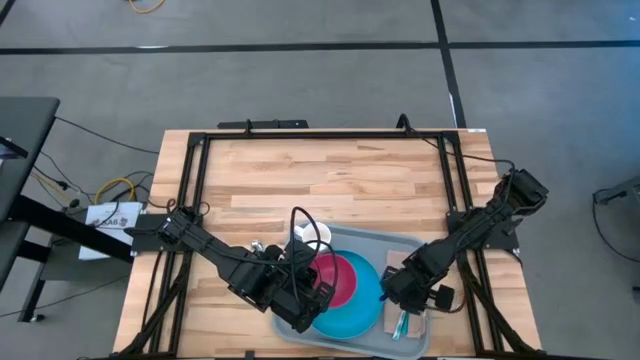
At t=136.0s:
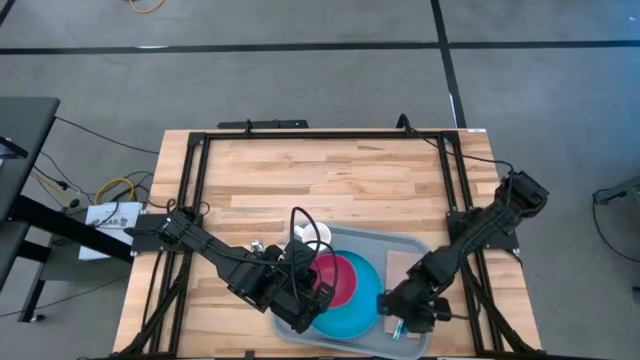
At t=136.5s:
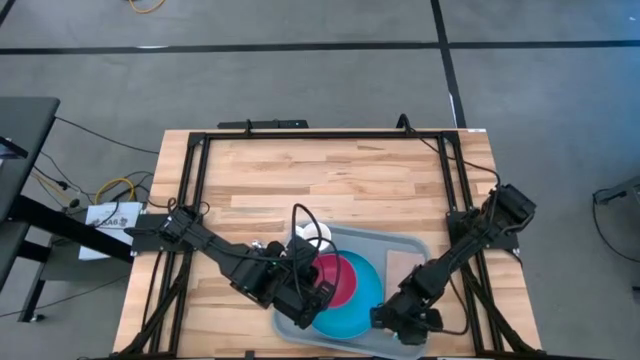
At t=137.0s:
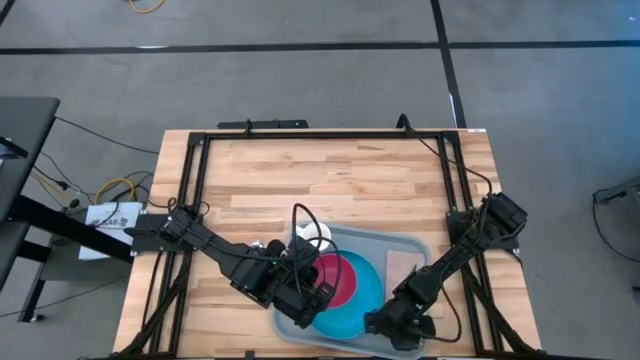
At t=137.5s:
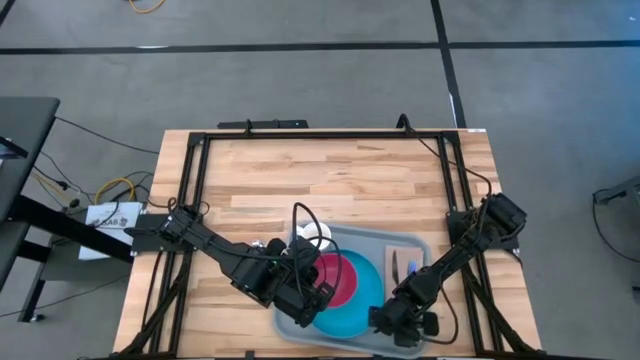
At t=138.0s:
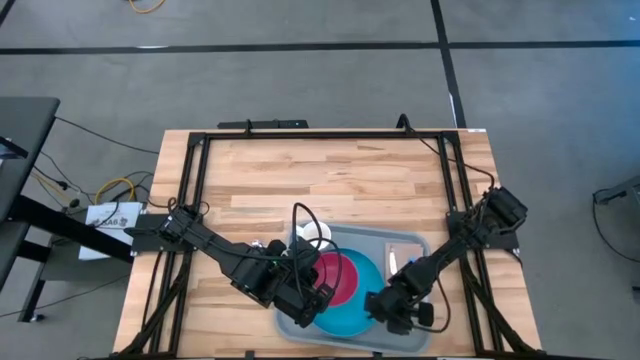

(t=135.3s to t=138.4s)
Task: Set up tray
Adjust the blue knife

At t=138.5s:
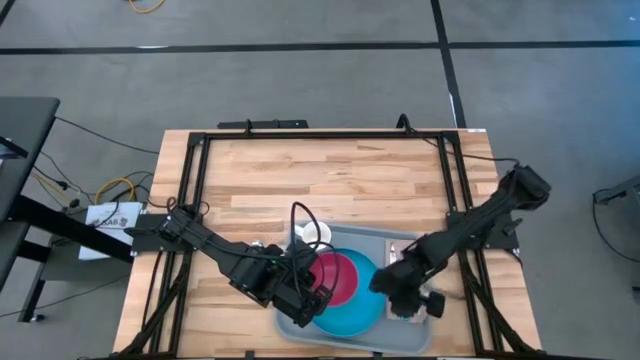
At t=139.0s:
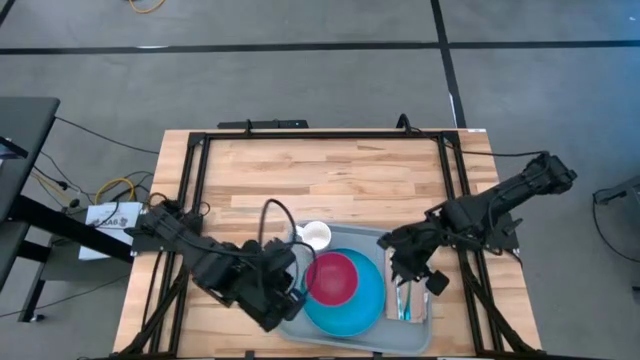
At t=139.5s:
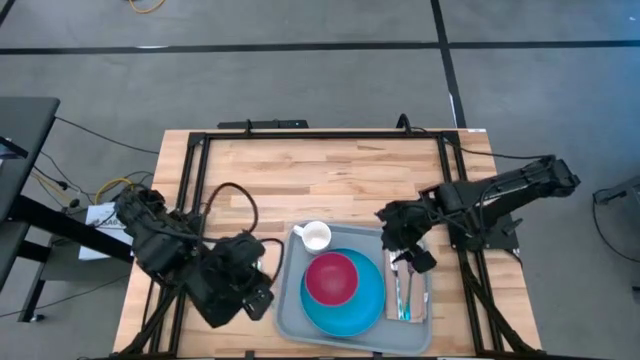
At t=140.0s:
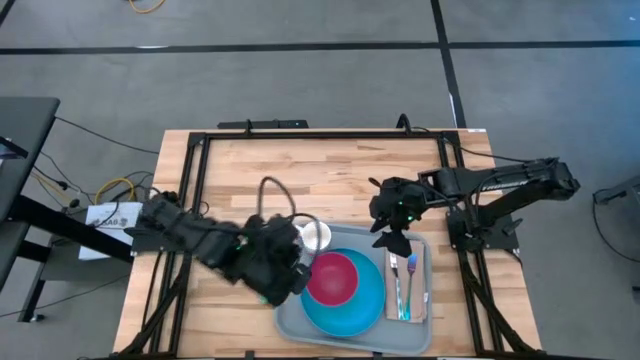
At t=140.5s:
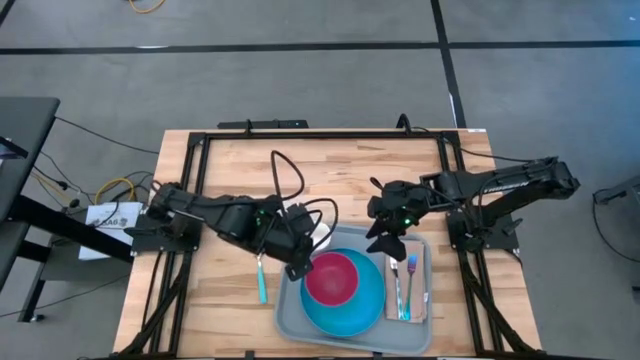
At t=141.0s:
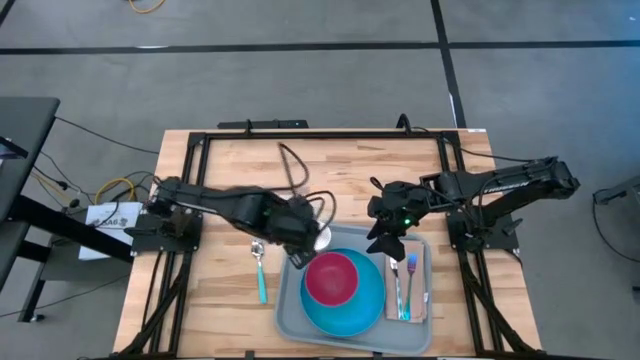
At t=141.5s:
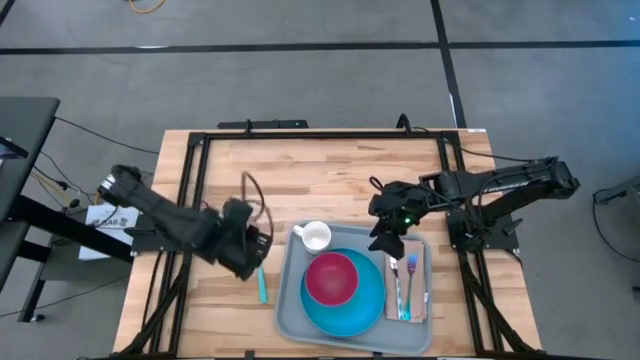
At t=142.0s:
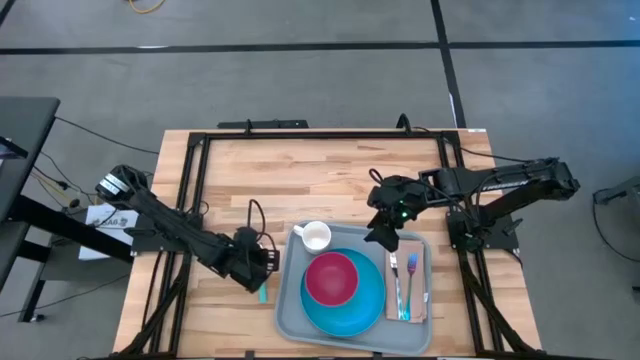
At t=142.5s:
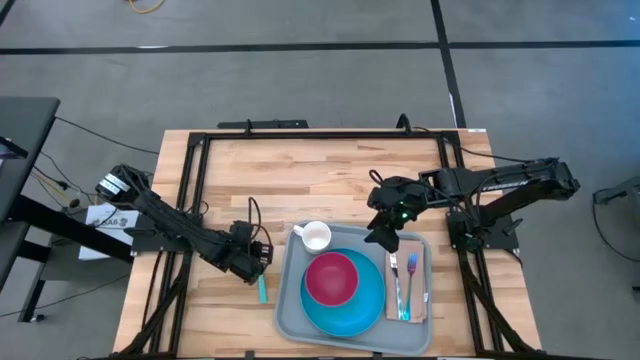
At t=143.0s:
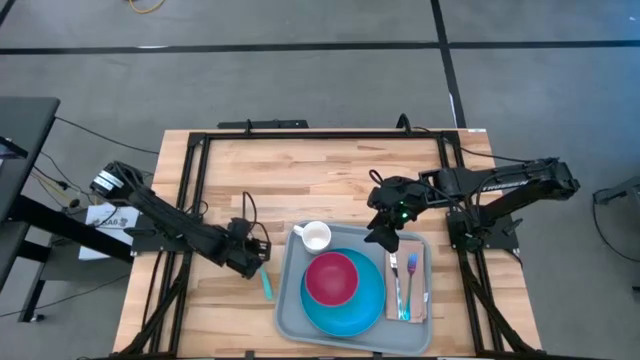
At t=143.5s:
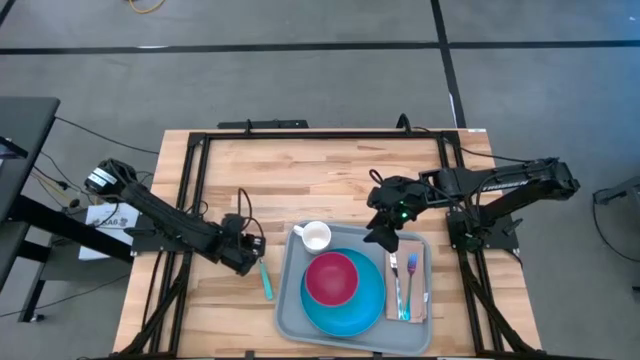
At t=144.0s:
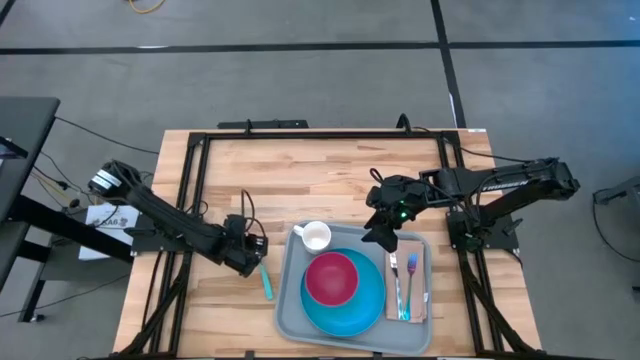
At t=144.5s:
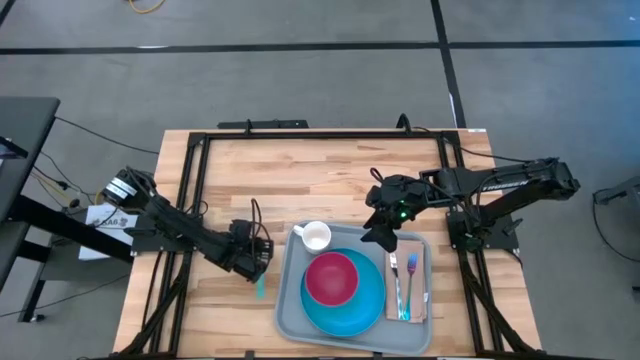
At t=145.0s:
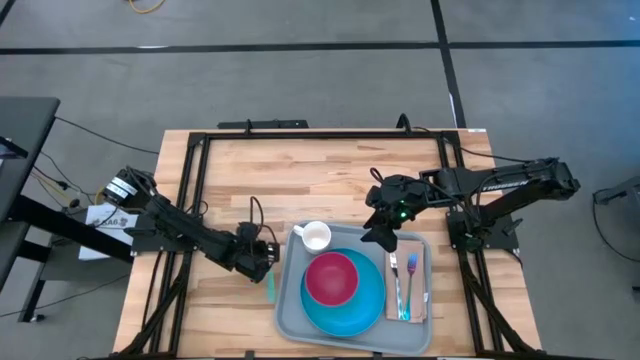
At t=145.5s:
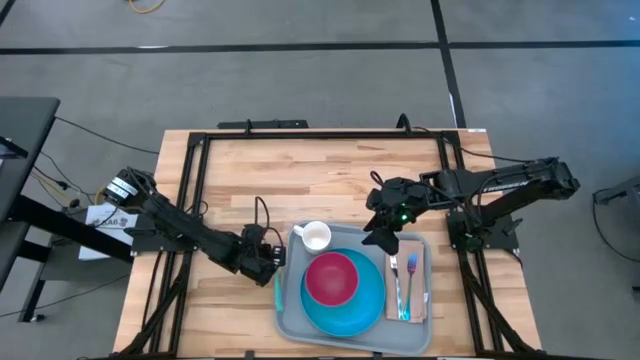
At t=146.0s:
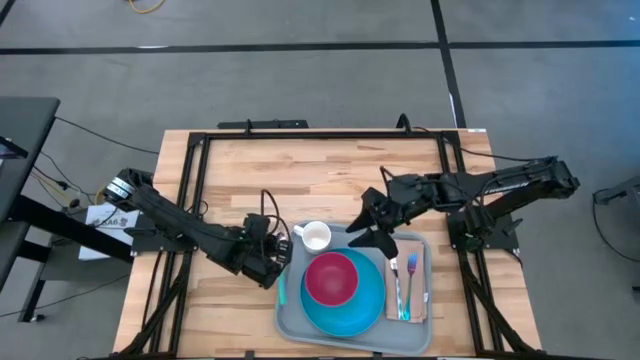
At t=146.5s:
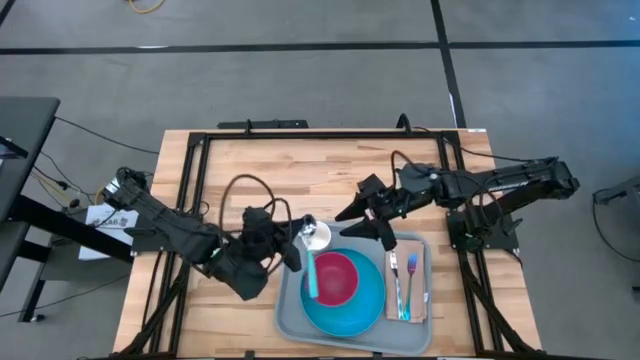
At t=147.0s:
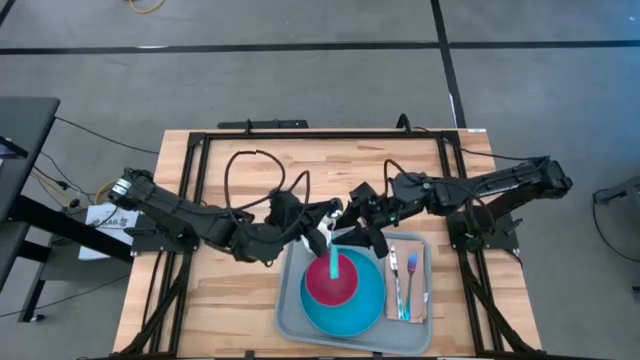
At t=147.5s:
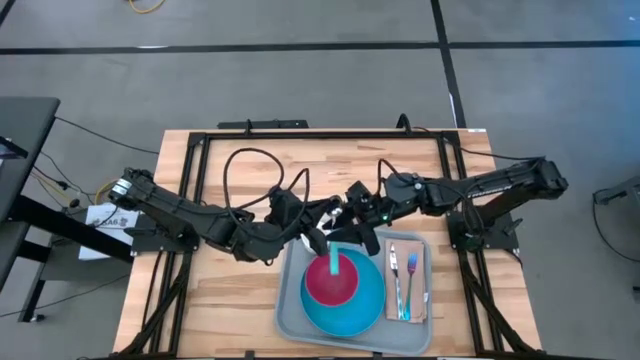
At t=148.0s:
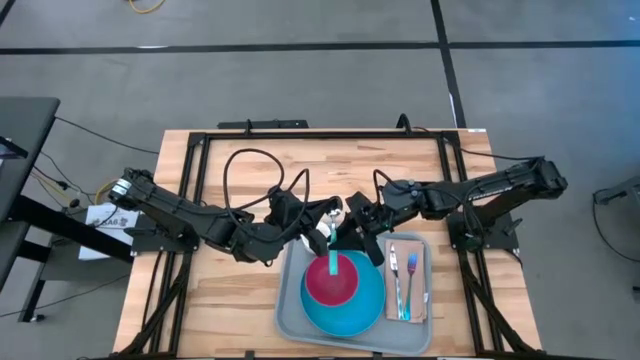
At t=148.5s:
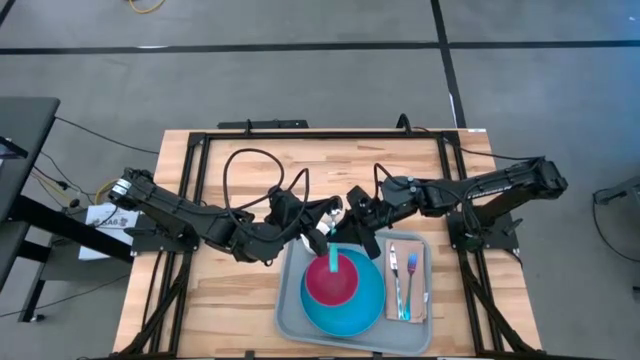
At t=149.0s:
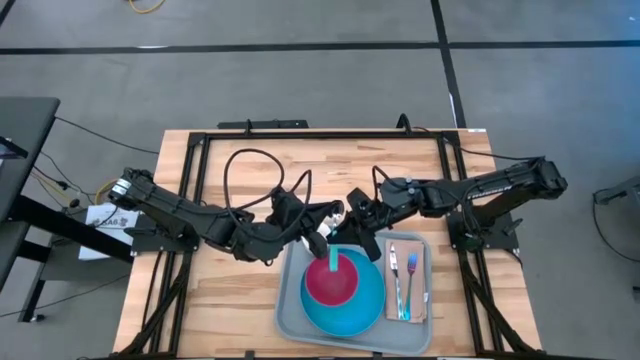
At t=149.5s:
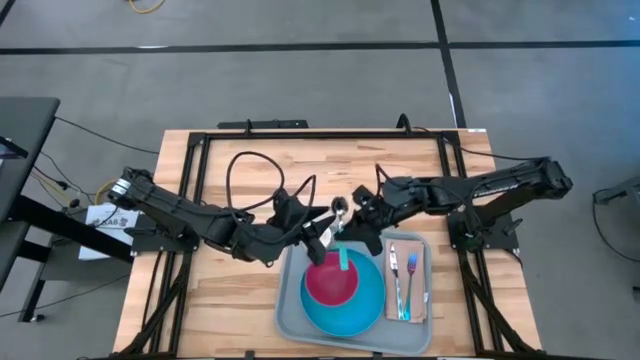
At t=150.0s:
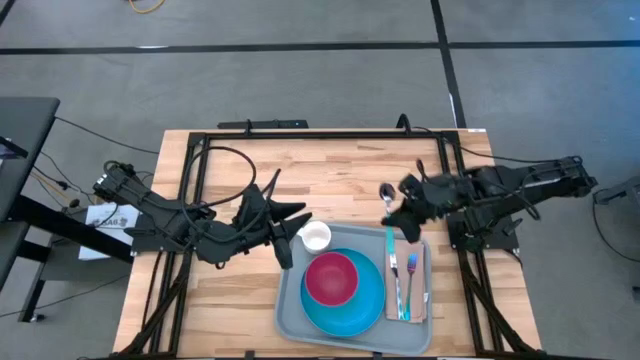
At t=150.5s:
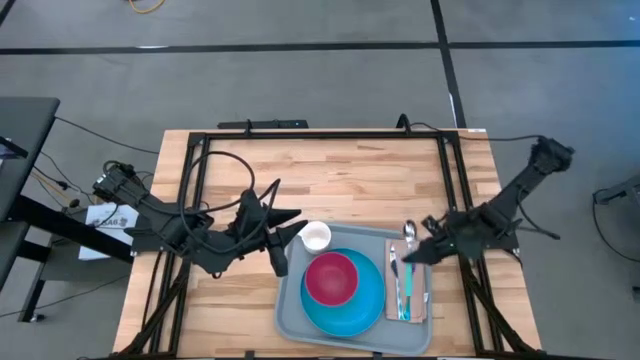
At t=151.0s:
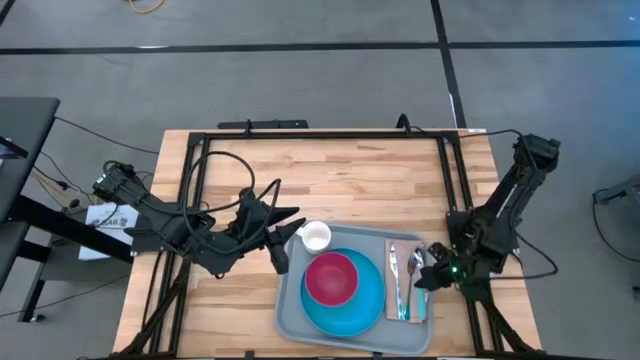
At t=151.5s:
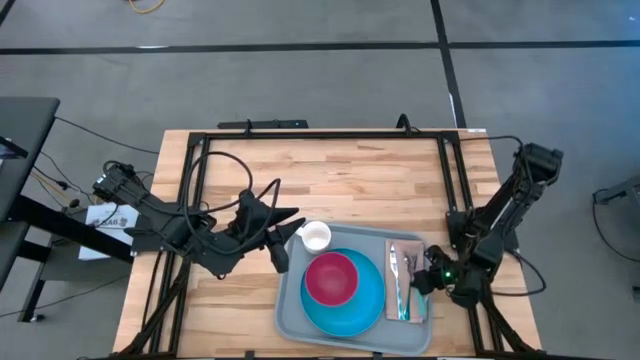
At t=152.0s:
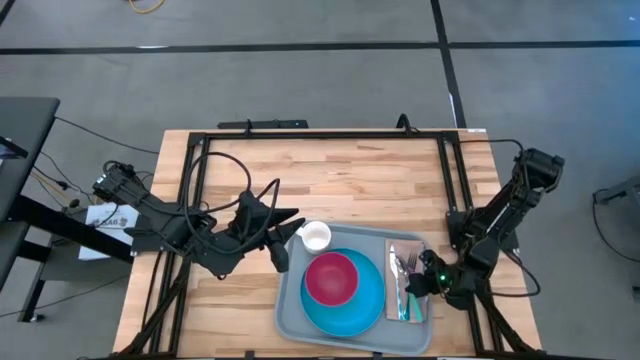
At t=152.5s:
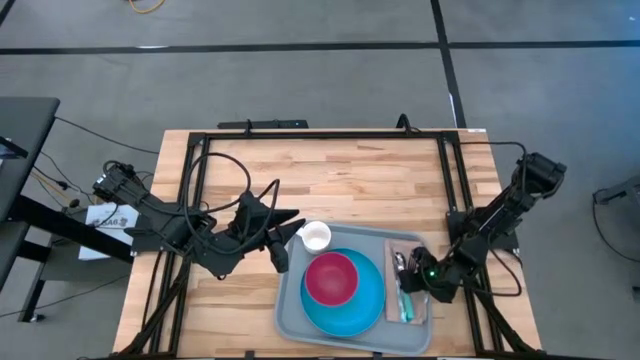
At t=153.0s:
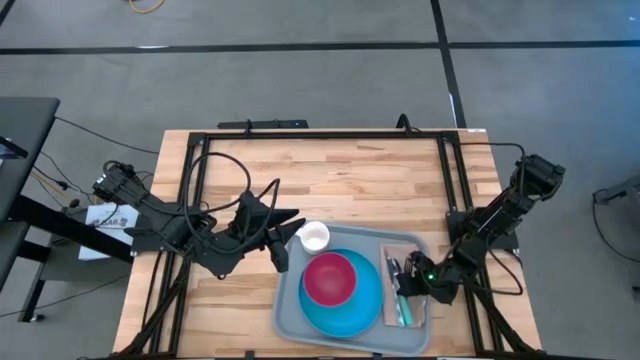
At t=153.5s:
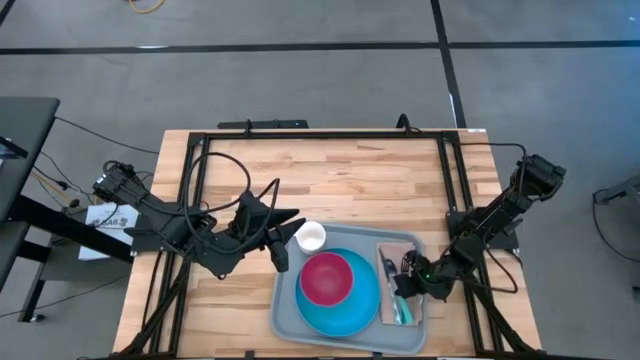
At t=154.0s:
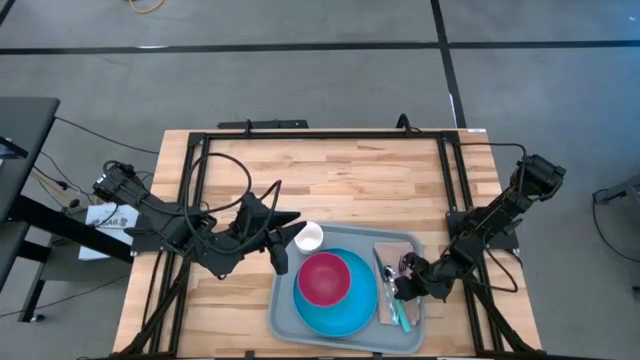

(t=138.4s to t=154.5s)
Put the green spoon on the brown napkin

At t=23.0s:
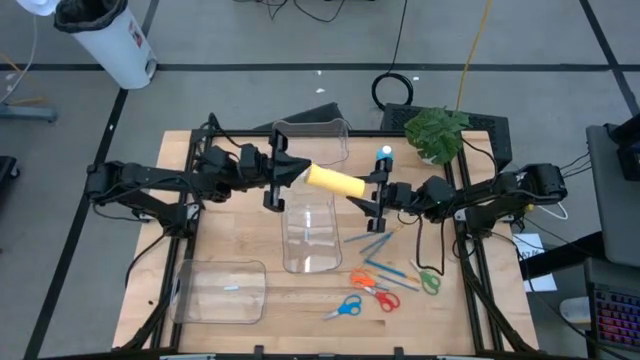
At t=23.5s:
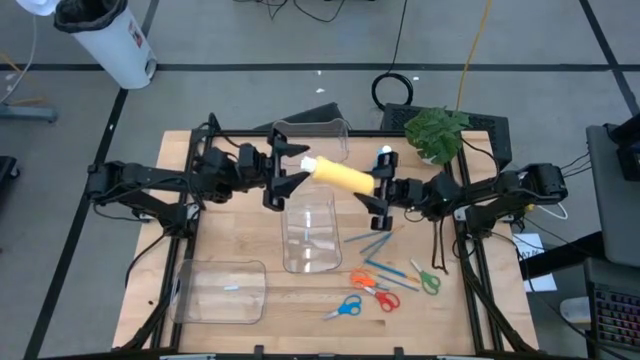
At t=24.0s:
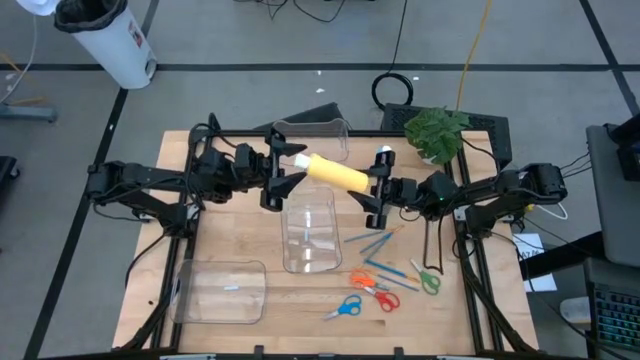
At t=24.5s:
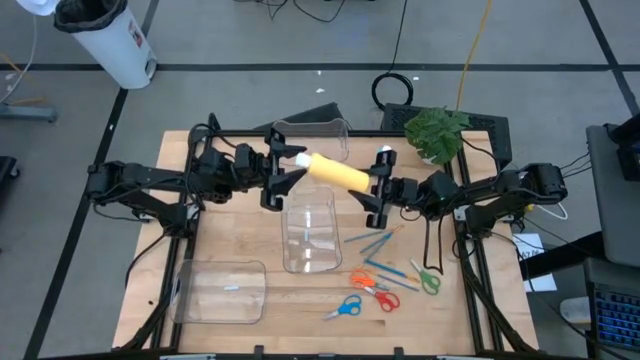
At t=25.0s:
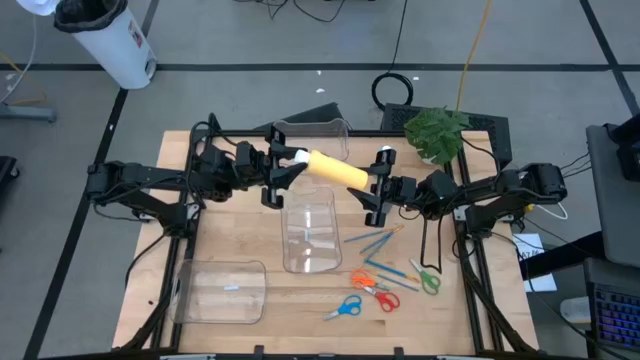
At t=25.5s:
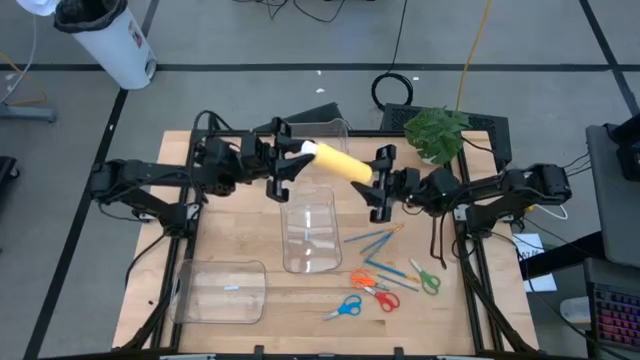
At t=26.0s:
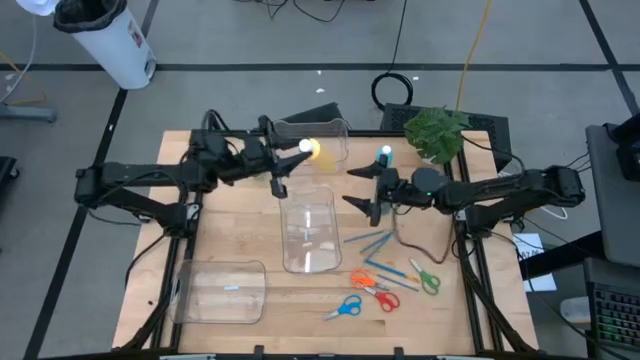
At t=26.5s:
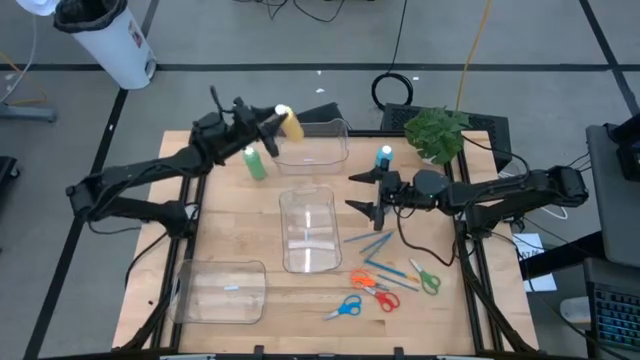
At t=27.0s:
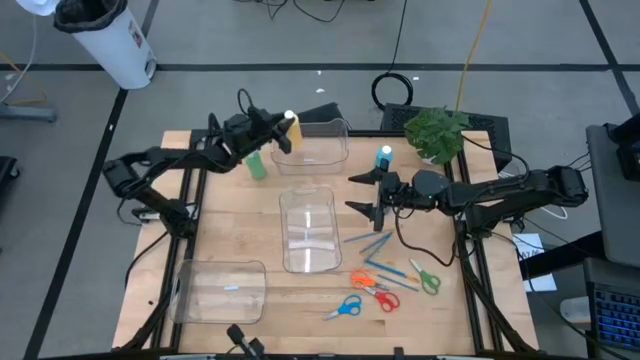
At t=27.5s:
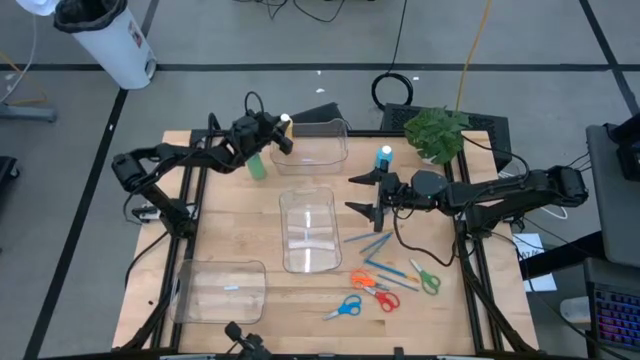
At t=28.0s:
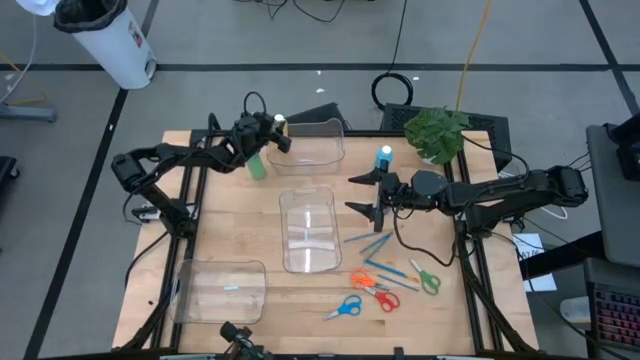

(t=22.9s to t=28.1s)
Task: Pick & Place Paint Supplies
Put the yellow paint bottle into the top transparent bin
